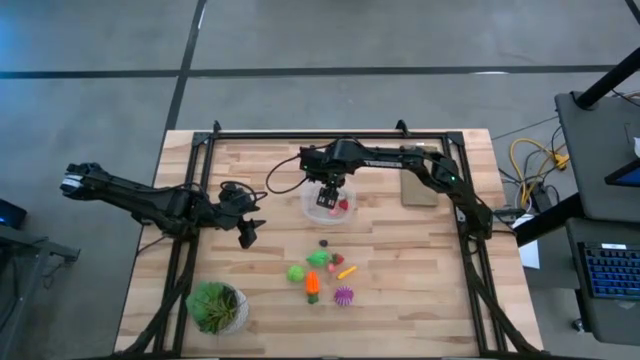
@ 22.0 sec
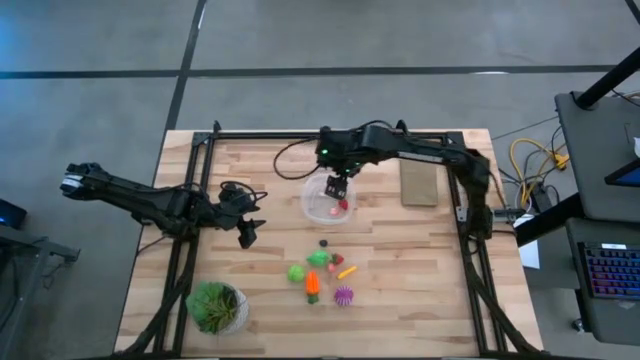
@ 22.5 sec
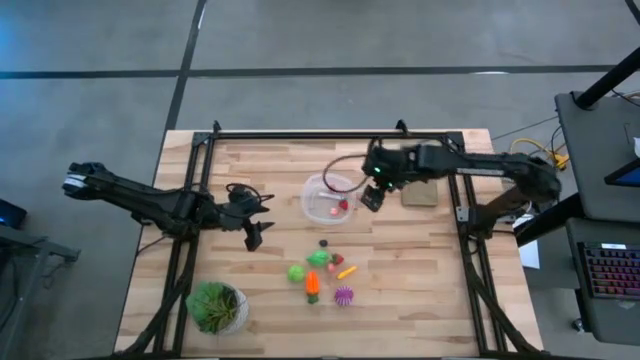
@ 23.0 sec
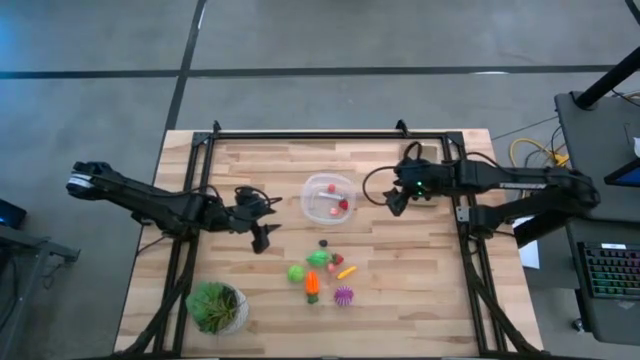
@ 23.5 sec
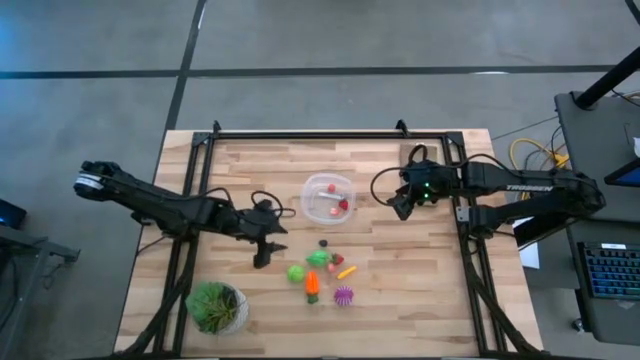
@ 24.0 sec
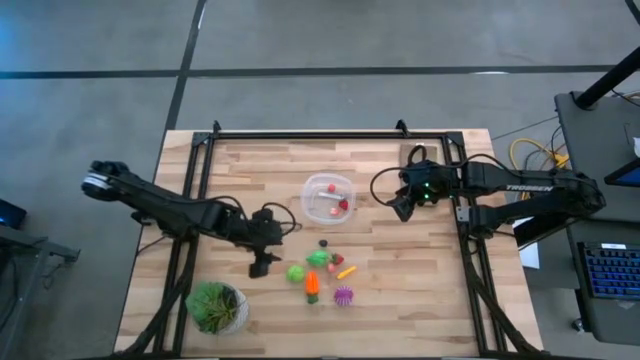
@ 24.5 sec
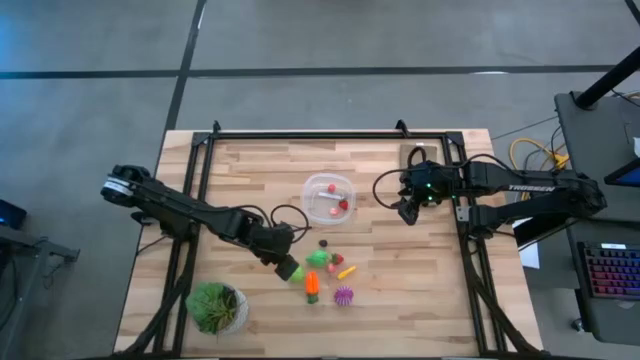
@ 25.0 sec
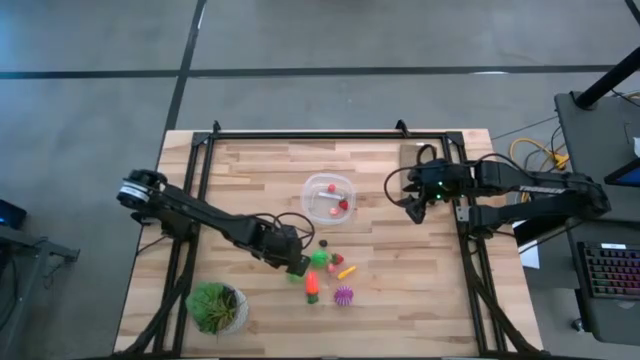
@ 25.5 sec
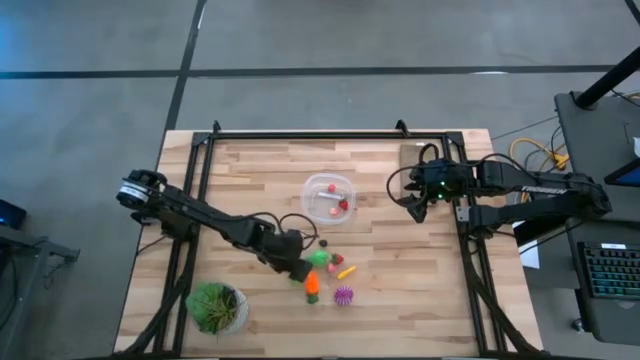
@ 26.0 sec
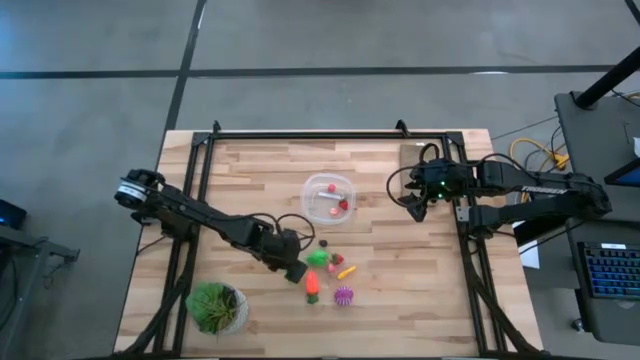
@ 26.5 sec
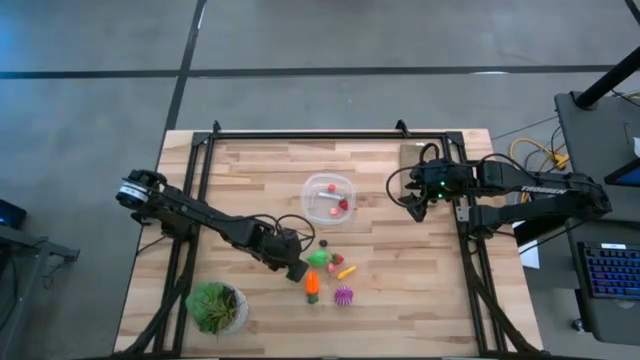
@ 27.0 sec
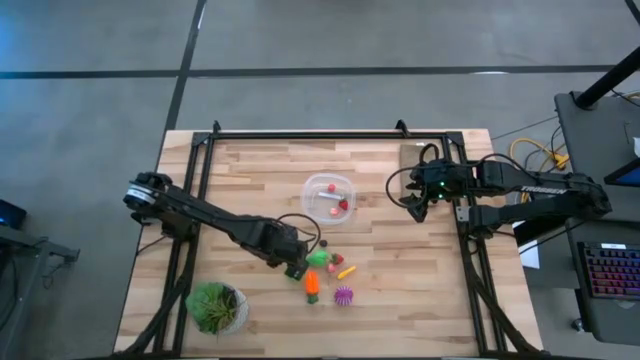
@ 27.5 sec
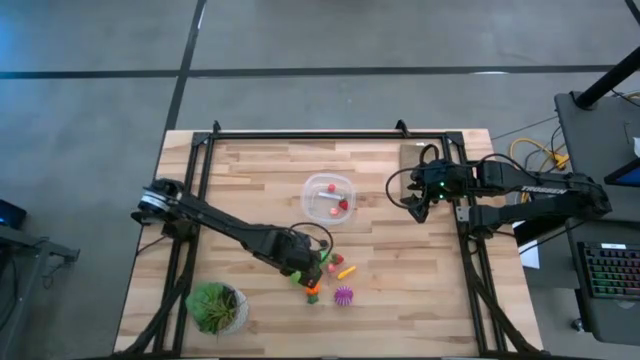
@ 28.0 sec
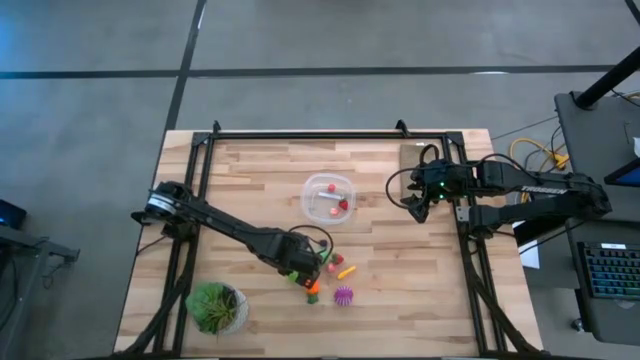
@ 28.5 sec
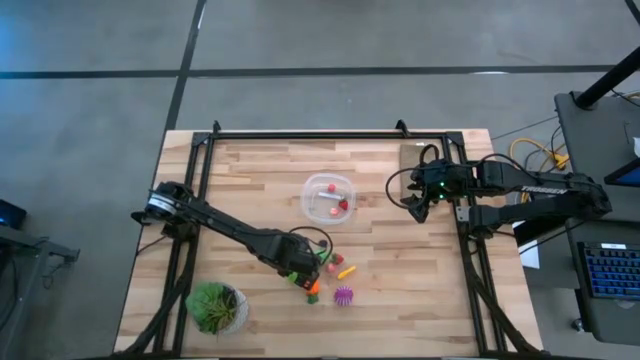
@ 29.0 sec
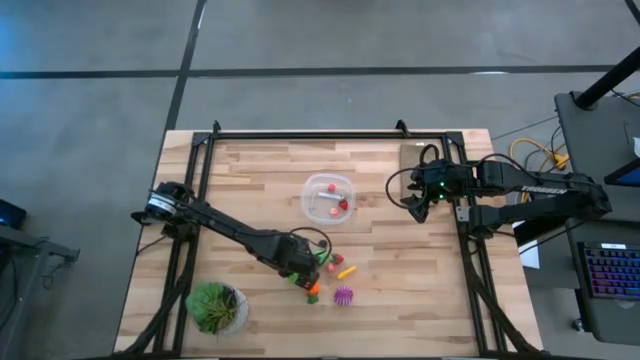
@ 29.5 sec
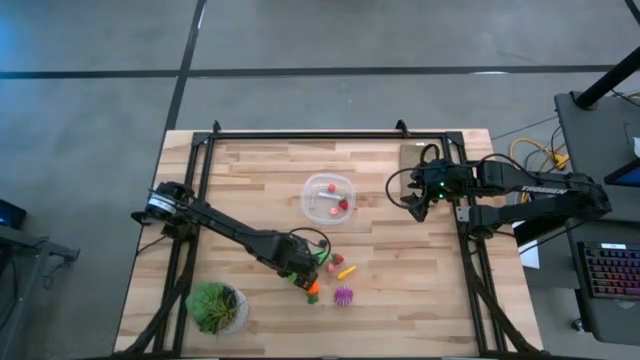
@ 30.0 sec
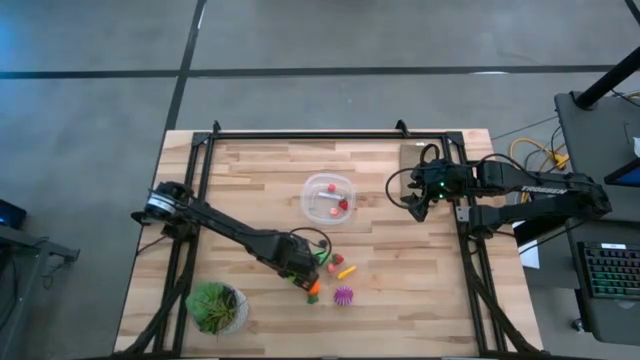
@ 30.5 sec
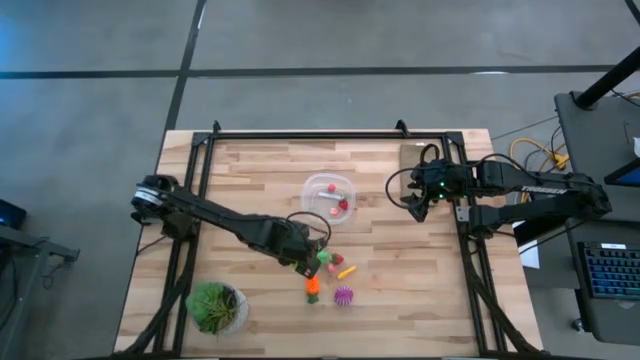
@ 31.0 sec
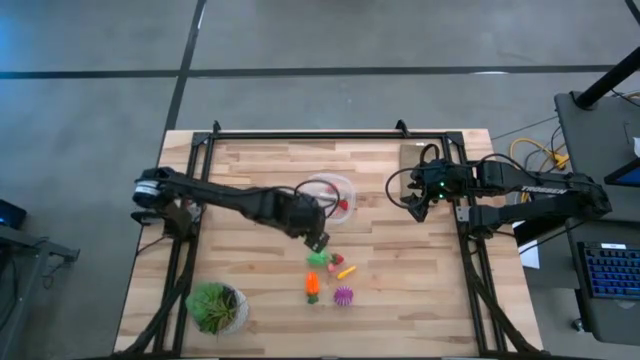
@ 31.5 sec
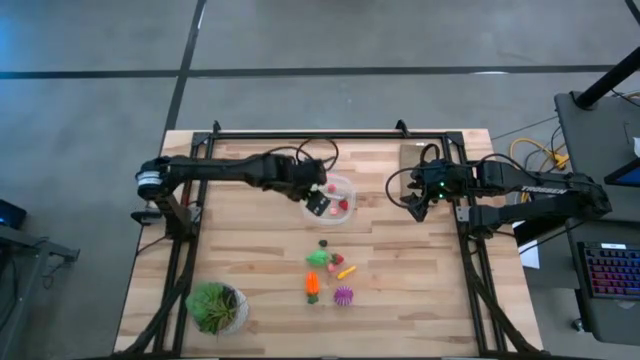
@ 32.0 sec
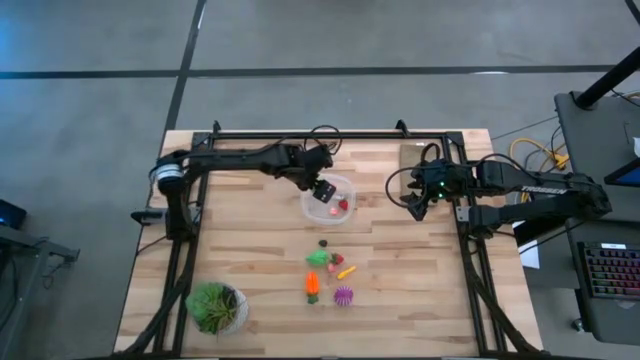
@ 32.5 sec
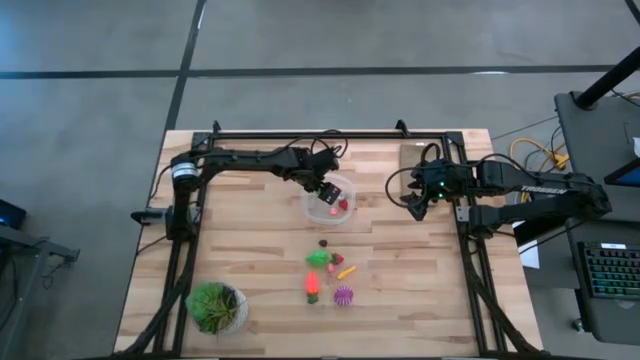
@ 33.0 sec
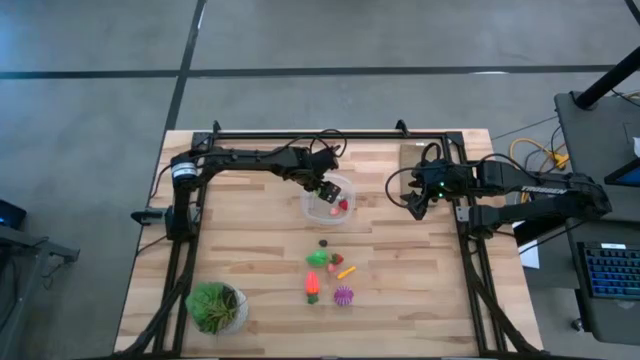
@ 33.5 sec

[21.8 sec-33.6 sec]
Task: Pick and placing Produce into tupperware
Put the green cabbage into the transparent container

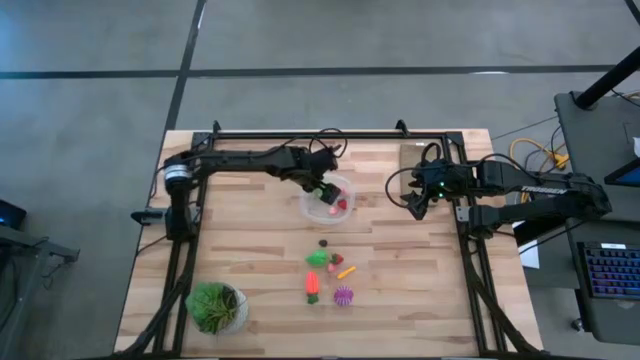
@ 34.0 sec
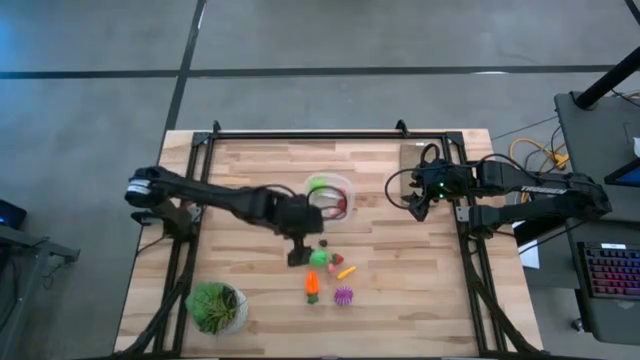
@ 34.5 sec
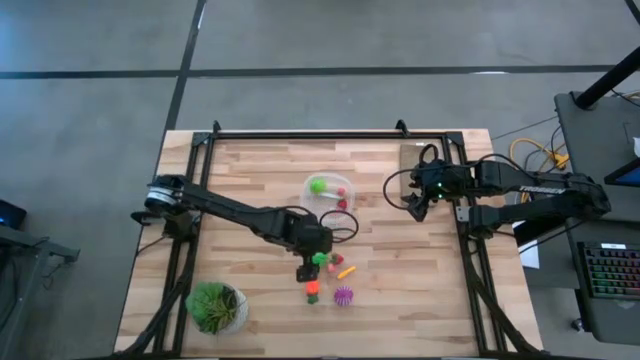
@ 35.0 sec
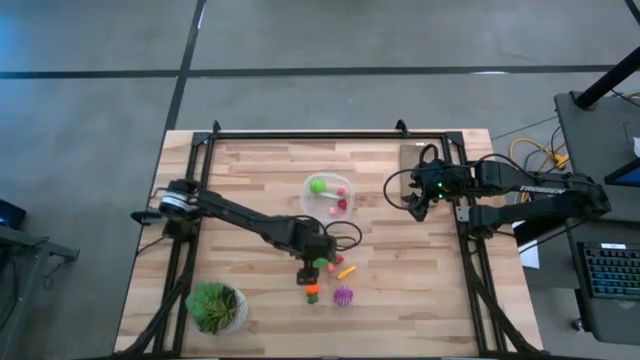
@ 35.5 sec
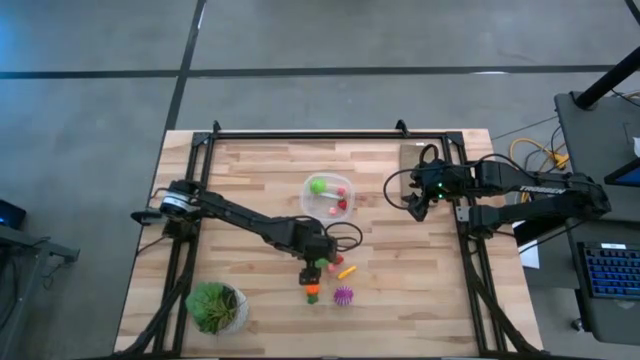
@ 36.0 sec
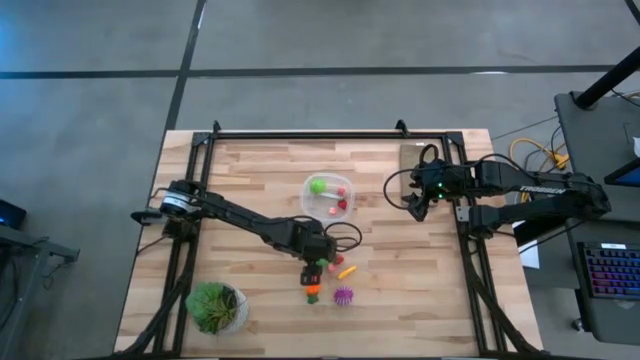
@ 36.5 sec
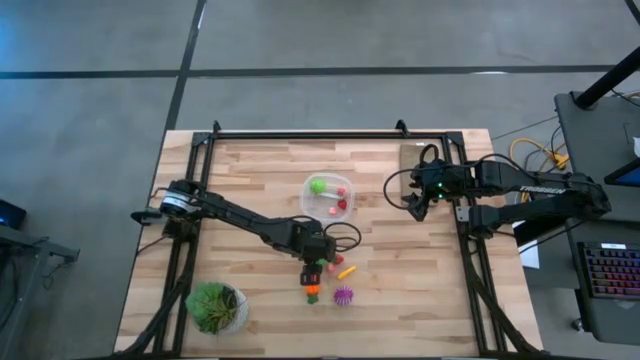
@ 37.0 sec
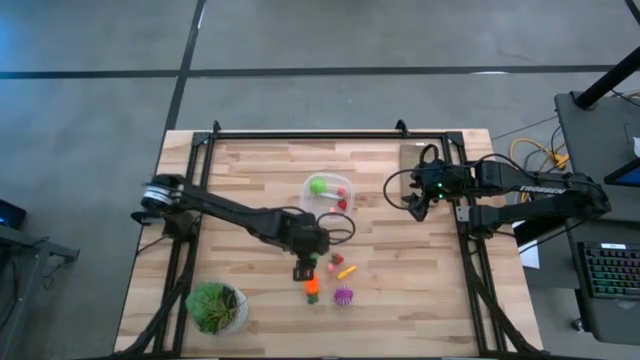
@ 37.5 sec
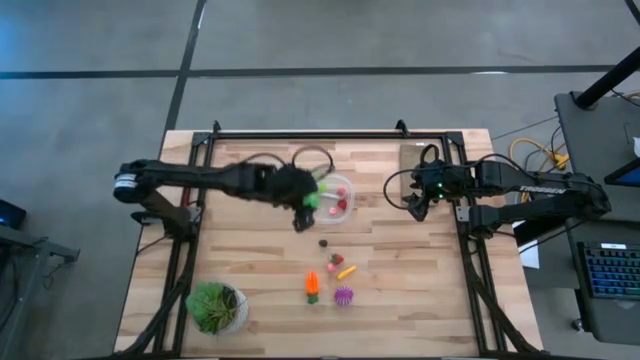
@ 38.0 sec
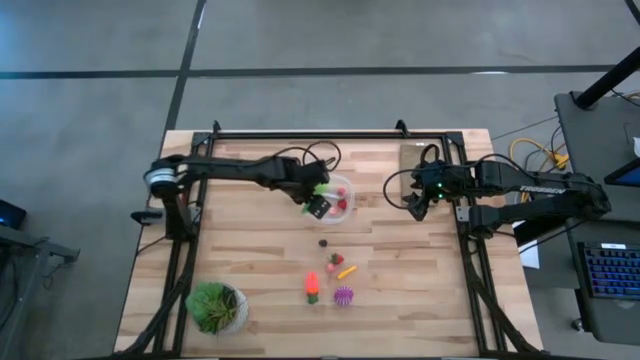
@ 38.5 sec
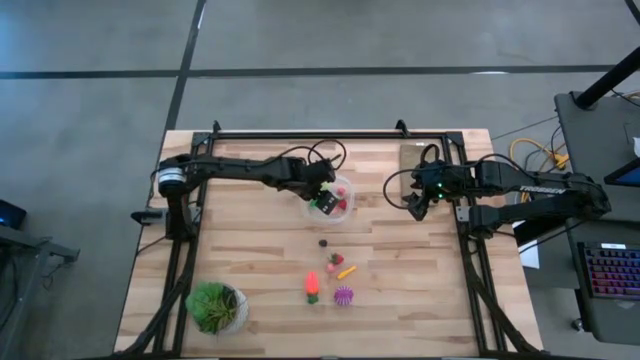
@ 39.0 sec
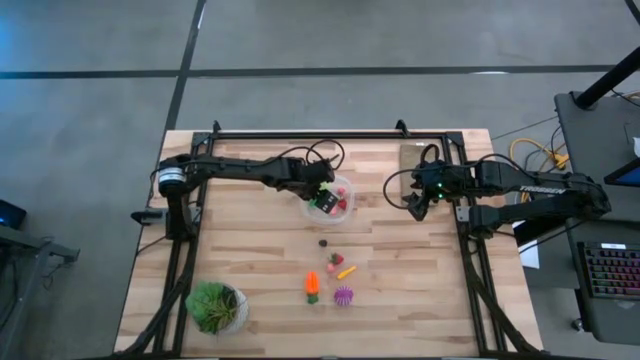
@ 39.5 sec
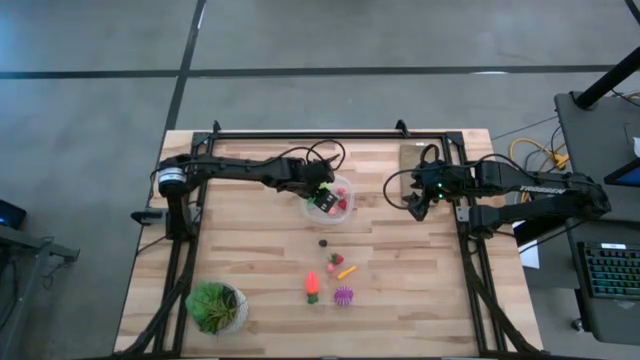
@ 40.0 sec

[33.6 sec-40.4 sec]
Put the green pear into the transparent container

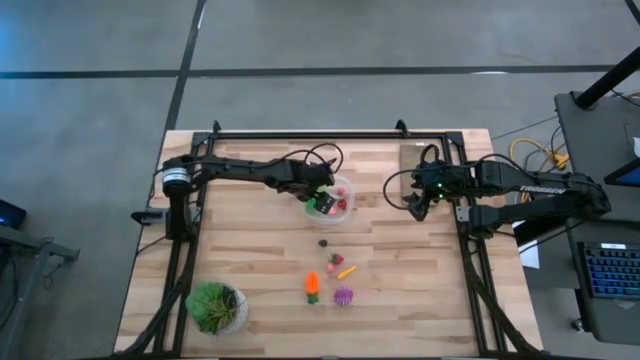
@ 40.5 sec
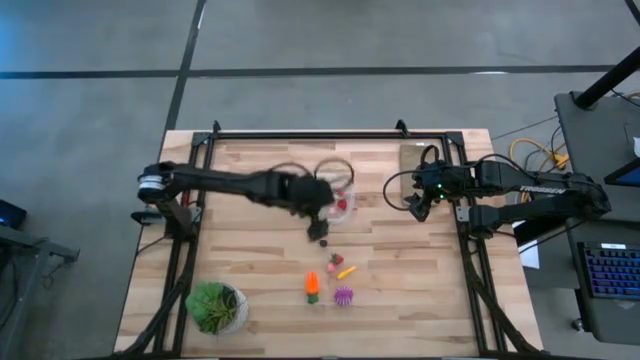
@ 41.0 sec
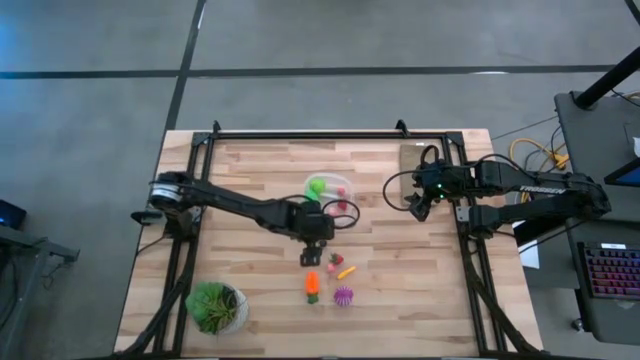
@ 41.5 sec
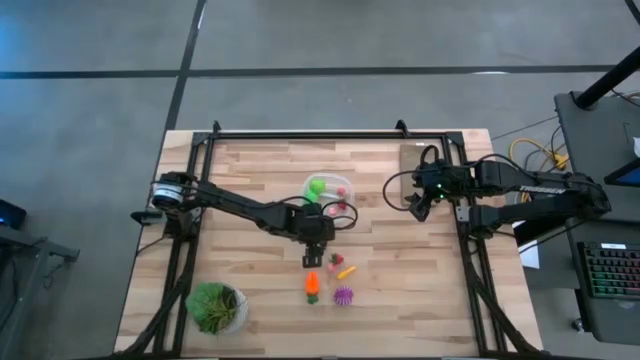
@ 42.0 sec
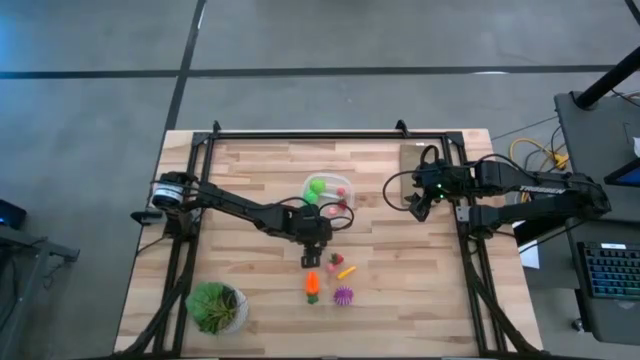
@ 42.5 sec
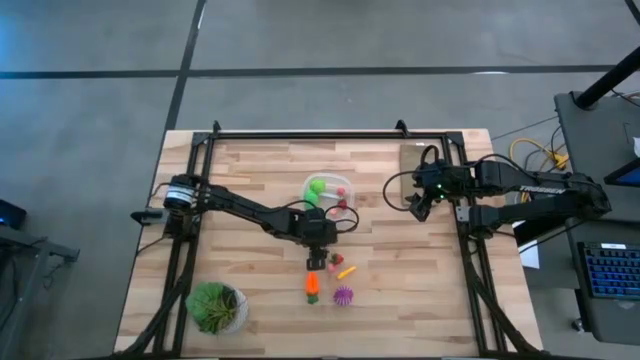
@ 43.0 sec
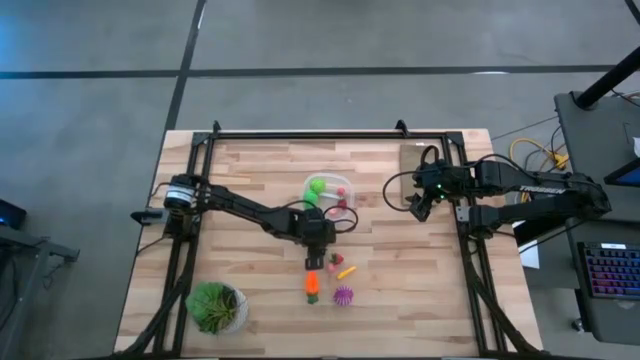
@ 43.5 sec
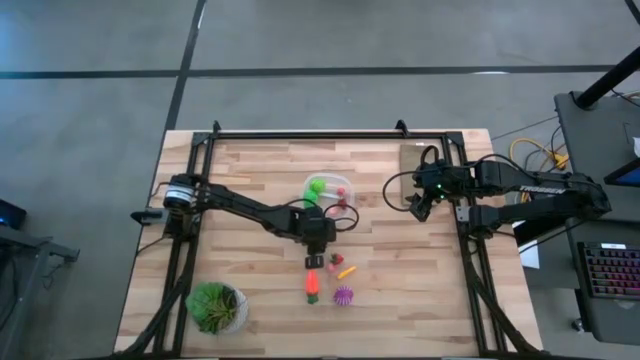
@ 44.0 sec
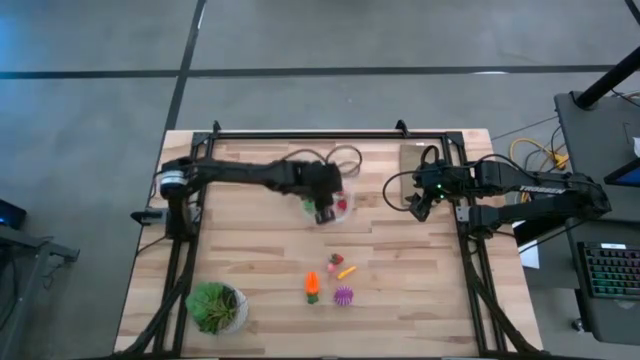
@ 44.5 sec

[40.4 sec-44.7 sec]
Put the black berry into the transparent container
